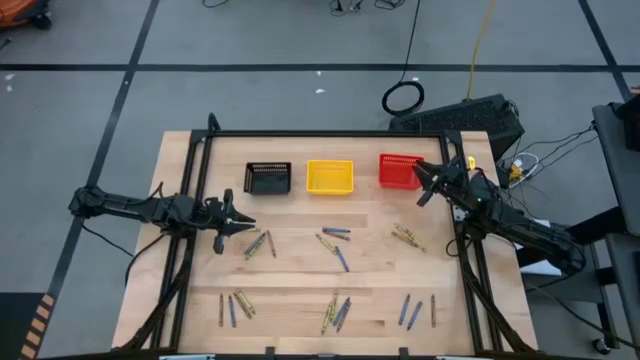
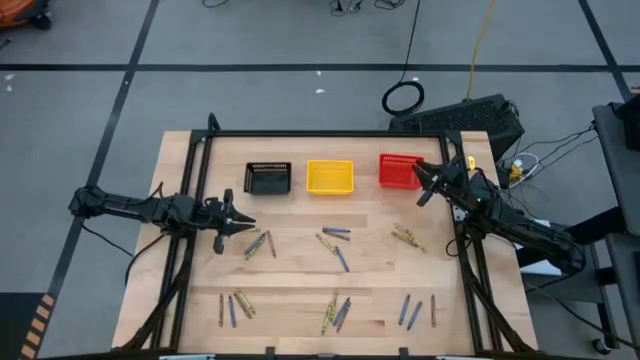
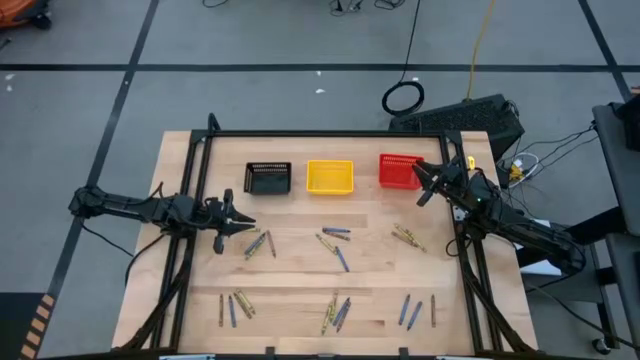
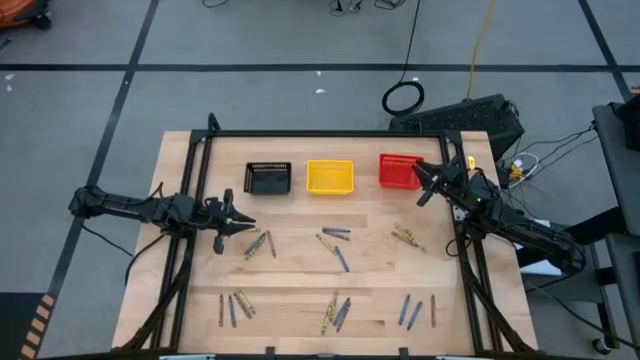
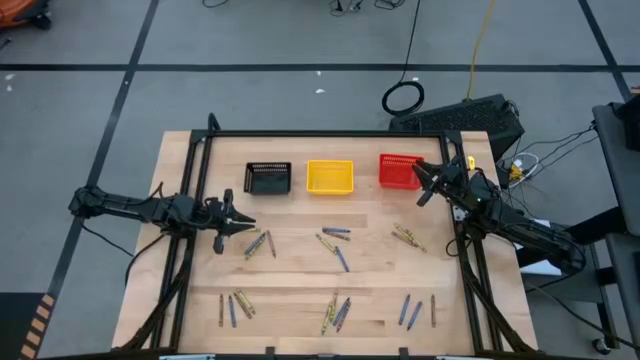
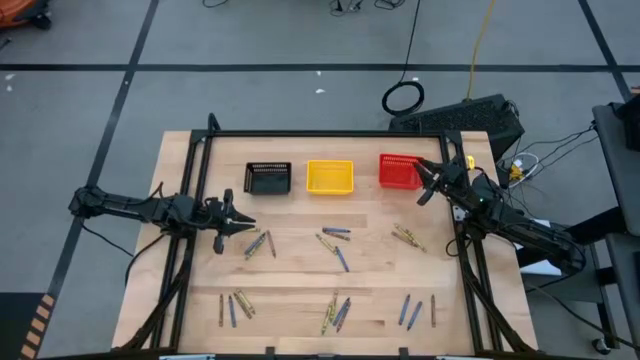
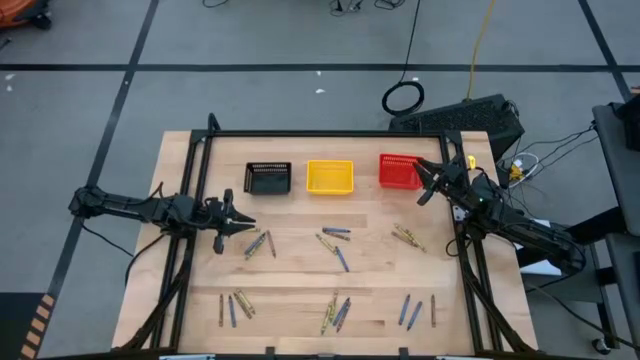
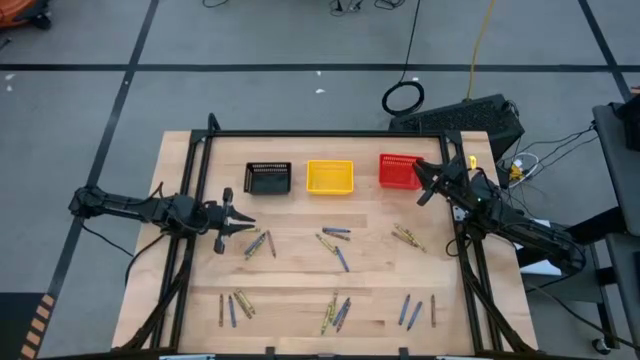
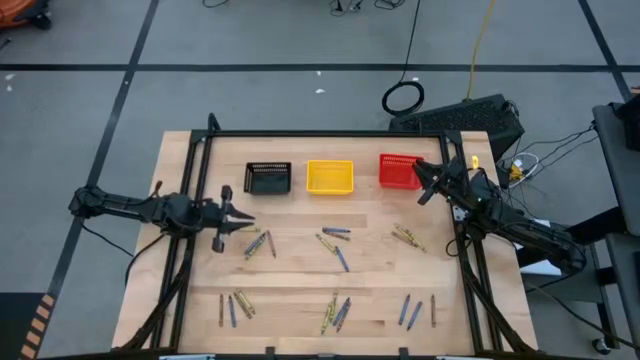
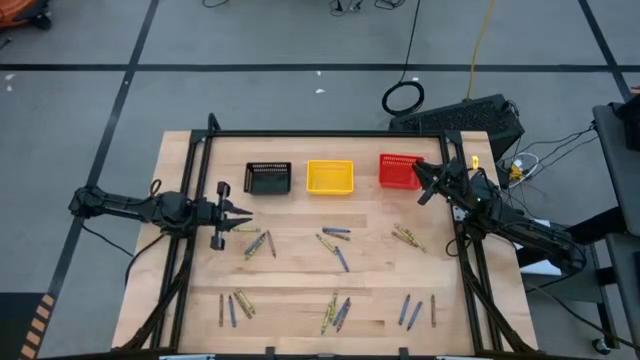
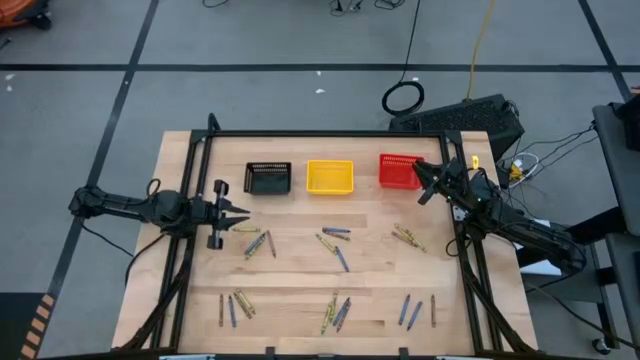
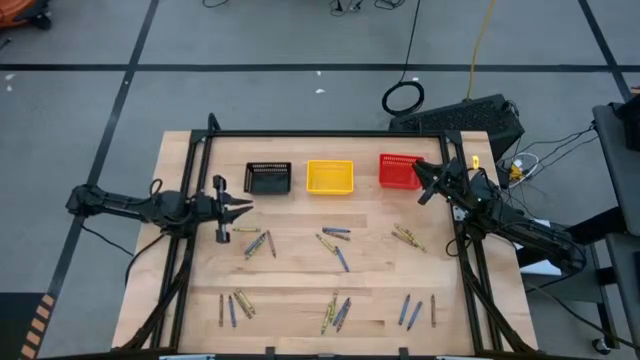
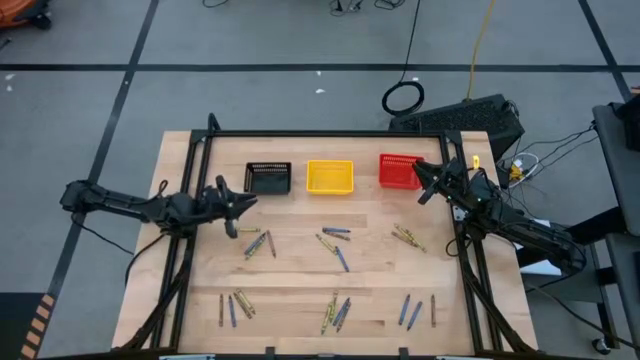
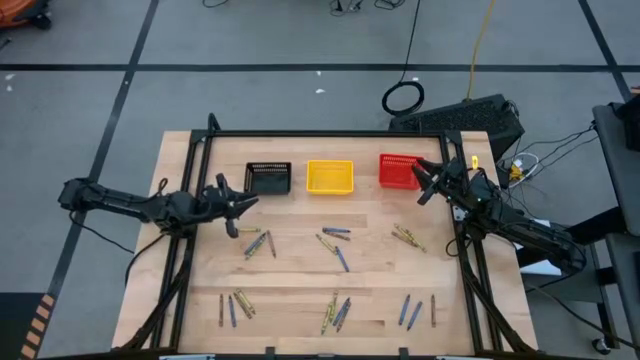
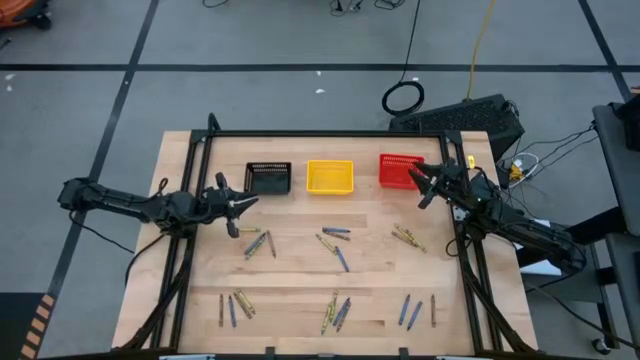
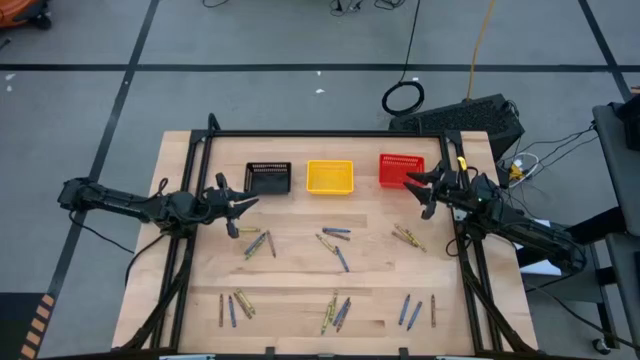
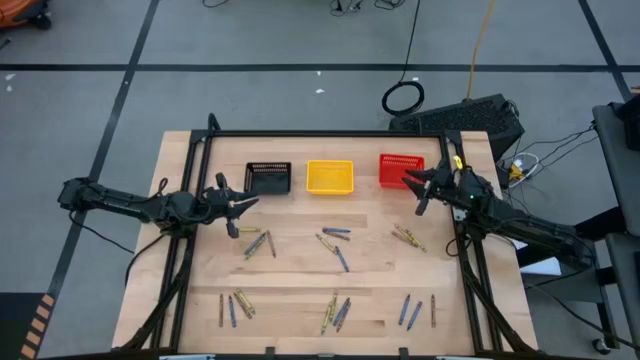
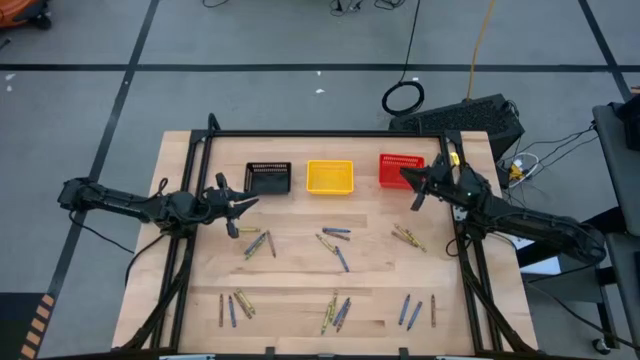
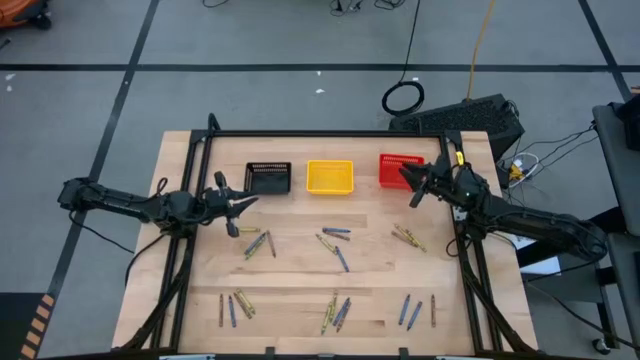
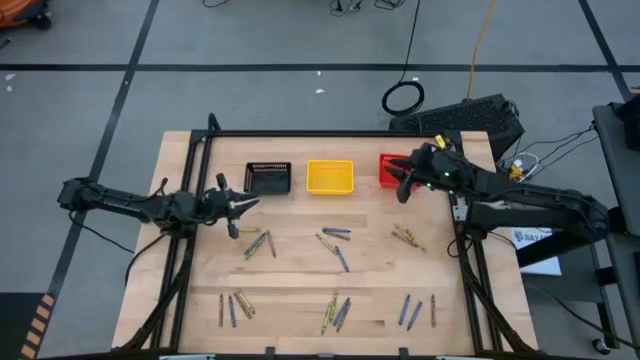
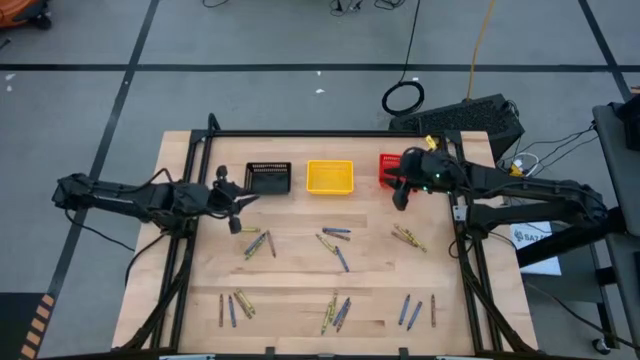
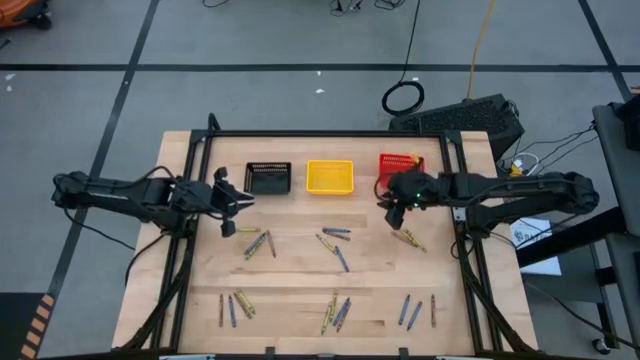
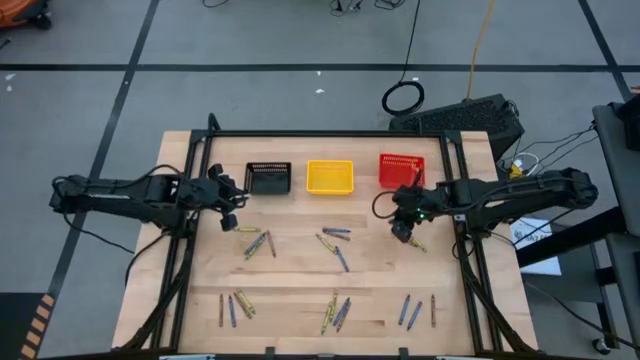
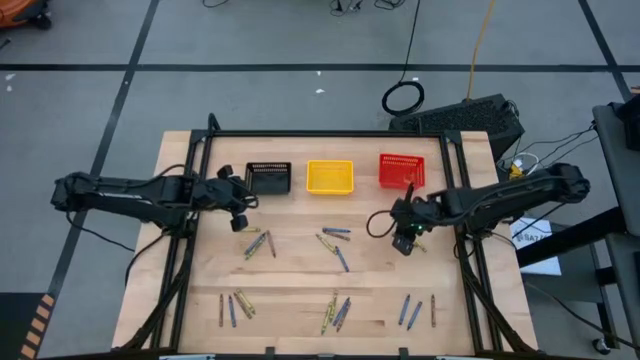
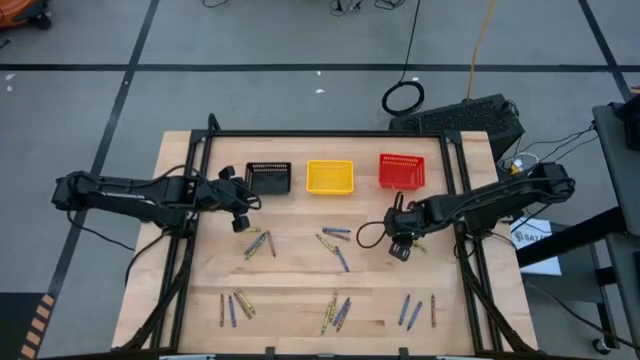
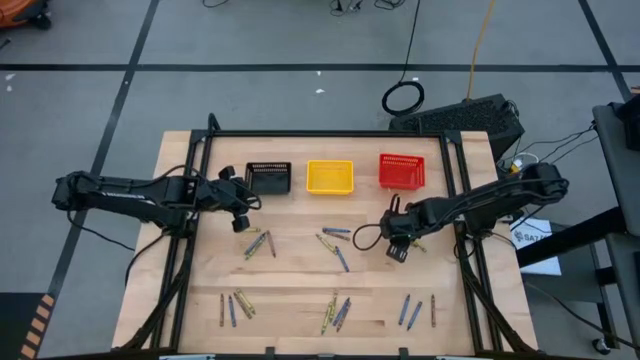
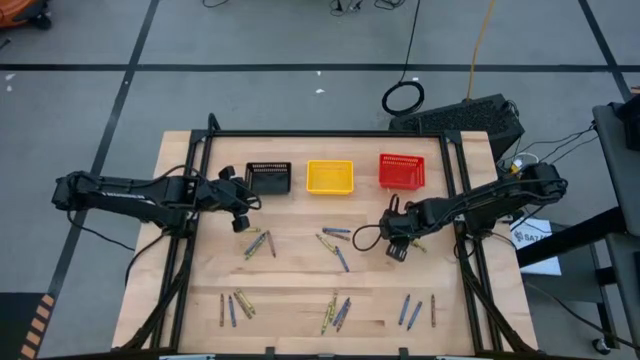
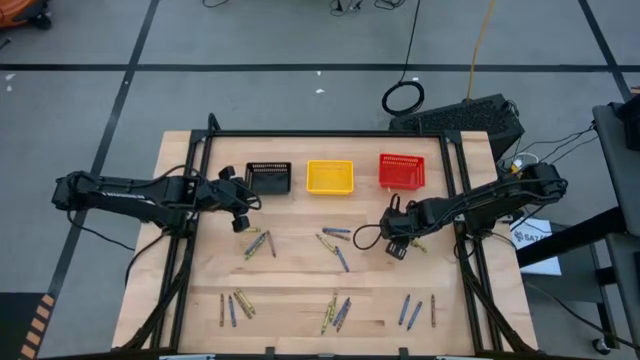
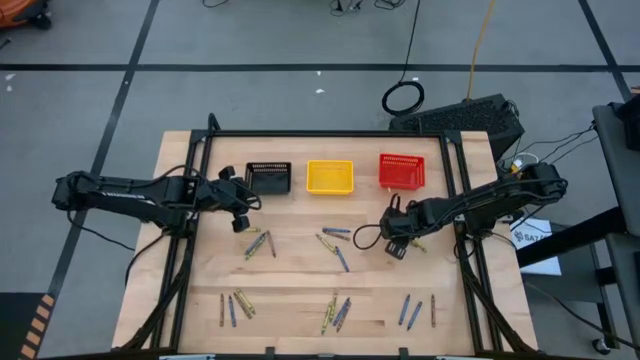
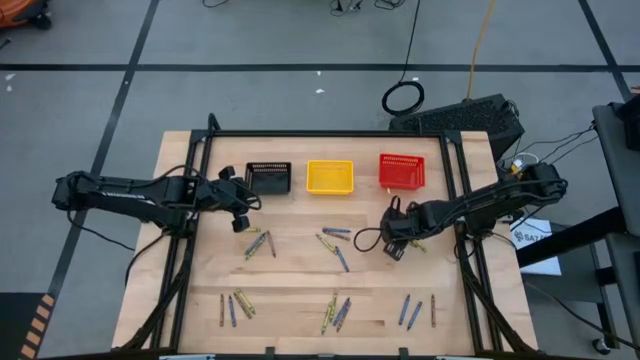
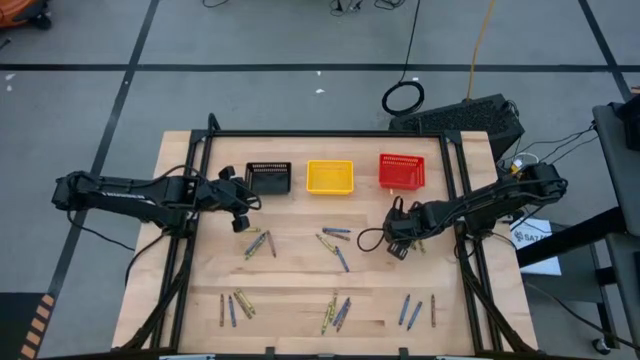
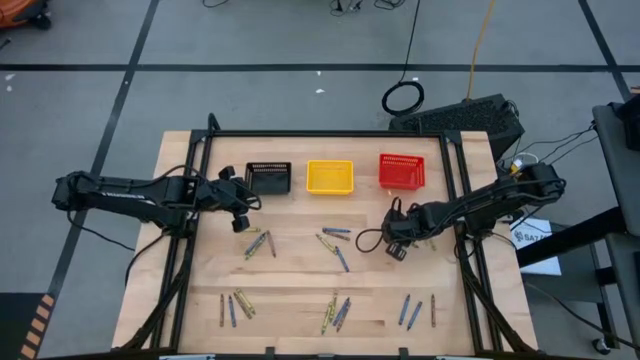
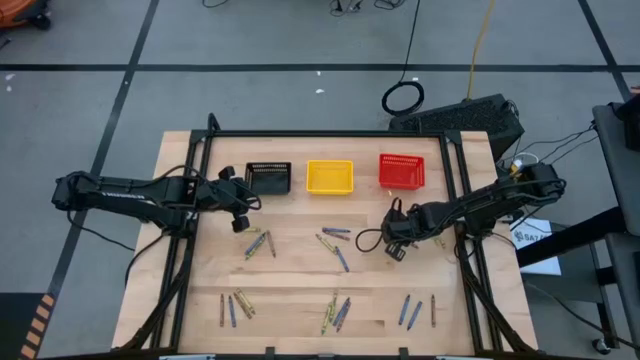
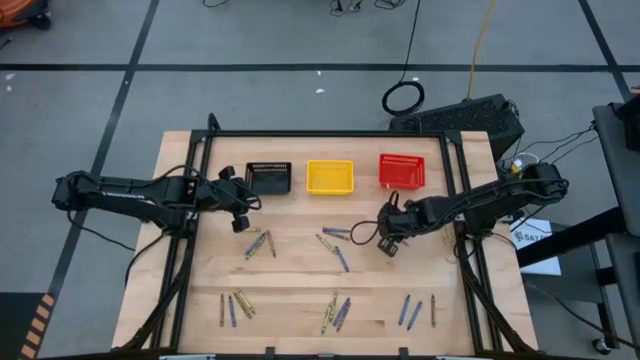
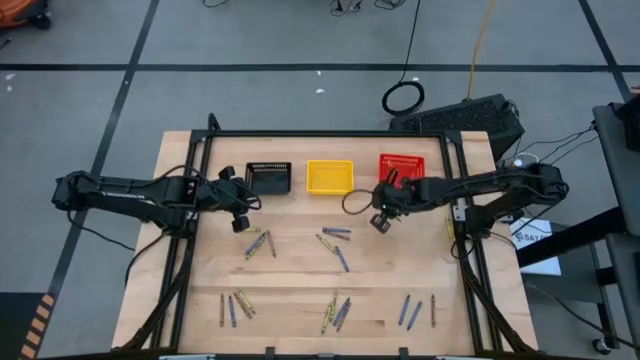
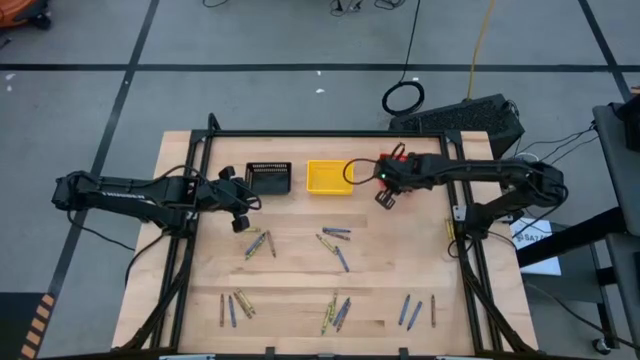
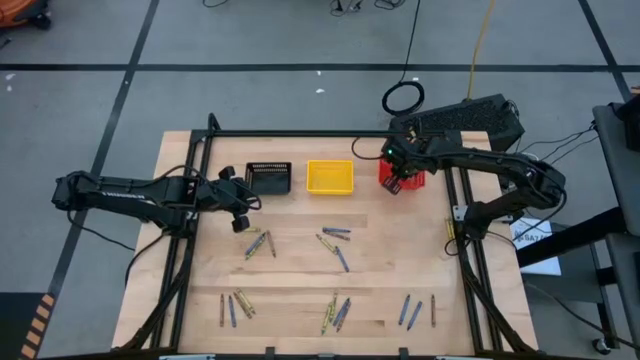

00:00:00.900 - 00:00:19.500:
Task: Sort crayons
Put the brown crayon into the red bin
